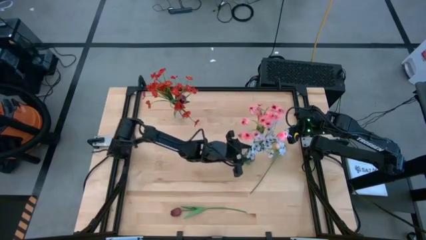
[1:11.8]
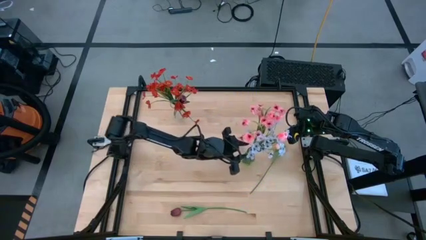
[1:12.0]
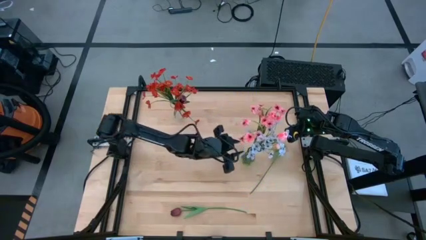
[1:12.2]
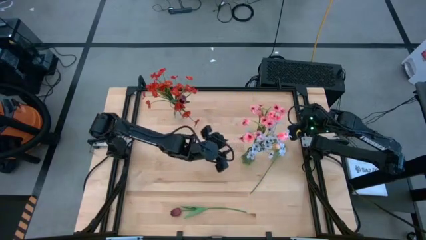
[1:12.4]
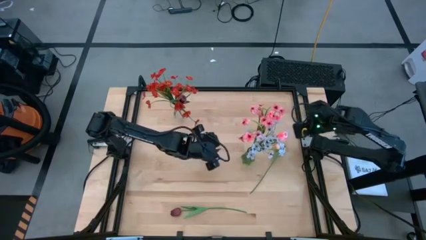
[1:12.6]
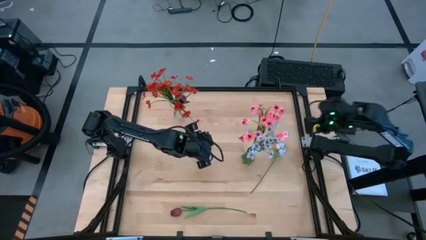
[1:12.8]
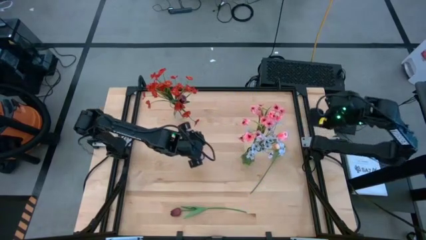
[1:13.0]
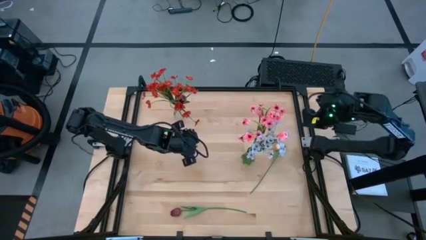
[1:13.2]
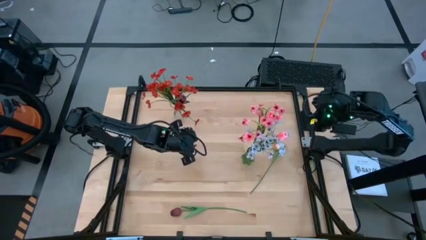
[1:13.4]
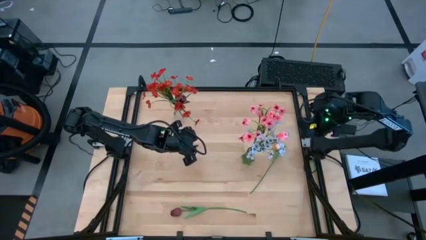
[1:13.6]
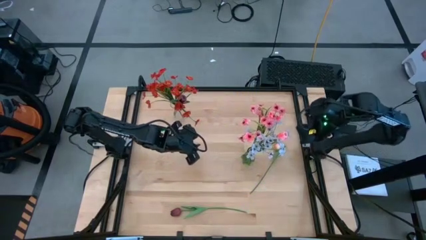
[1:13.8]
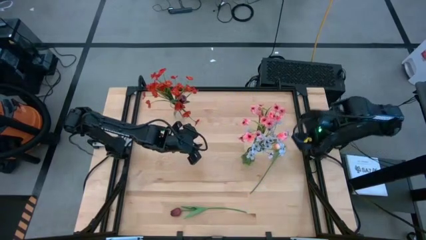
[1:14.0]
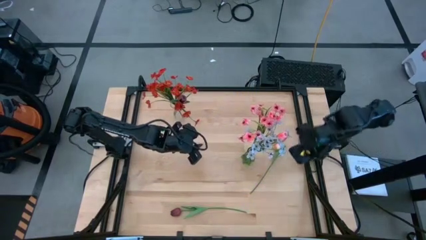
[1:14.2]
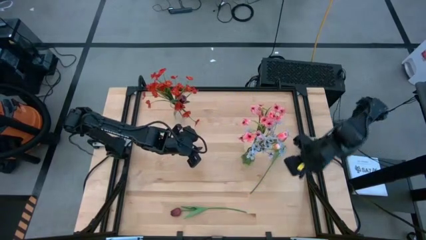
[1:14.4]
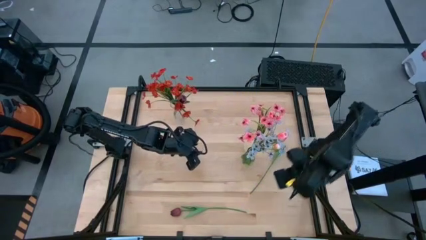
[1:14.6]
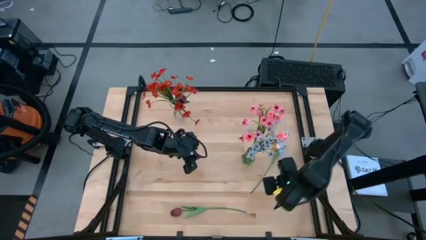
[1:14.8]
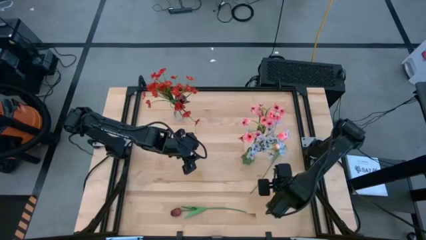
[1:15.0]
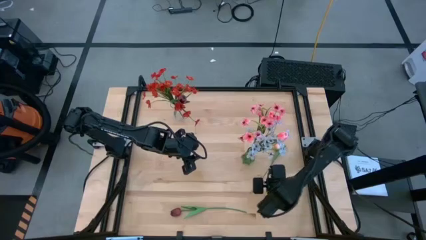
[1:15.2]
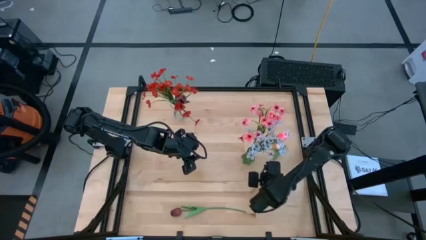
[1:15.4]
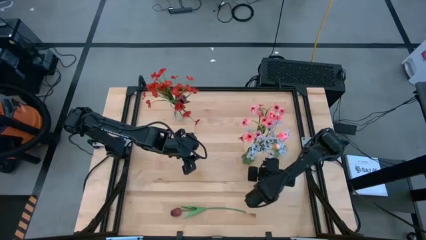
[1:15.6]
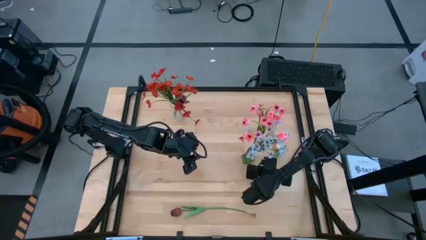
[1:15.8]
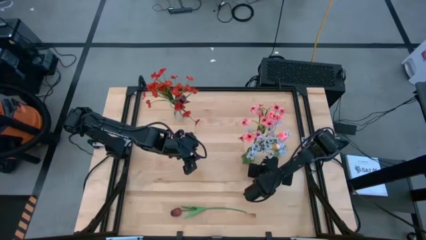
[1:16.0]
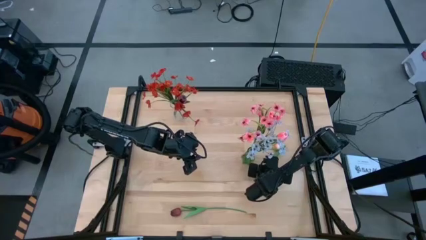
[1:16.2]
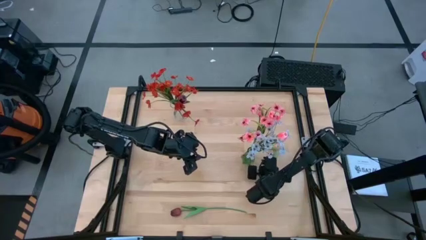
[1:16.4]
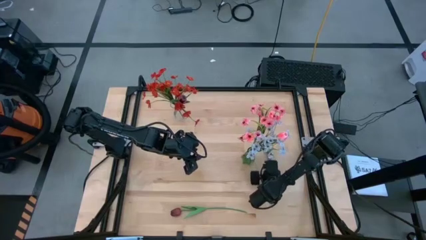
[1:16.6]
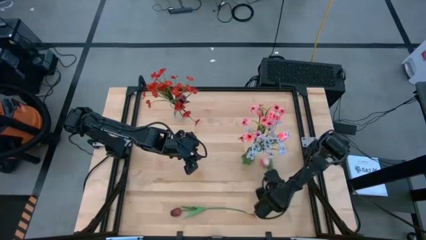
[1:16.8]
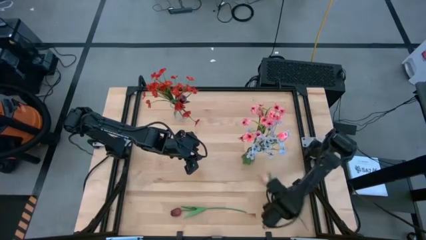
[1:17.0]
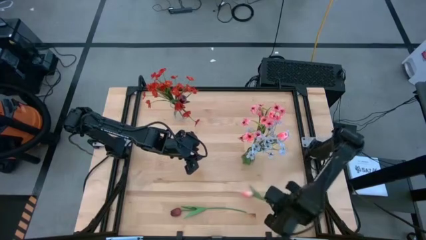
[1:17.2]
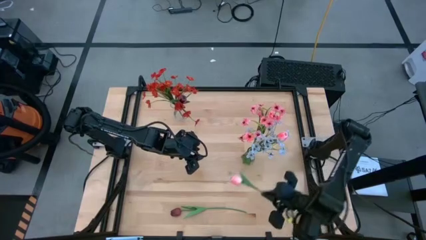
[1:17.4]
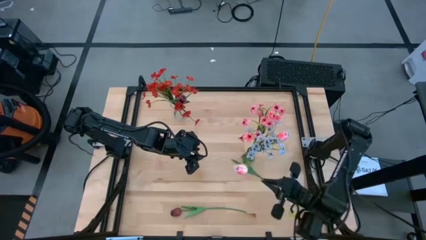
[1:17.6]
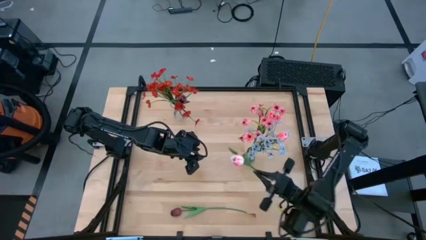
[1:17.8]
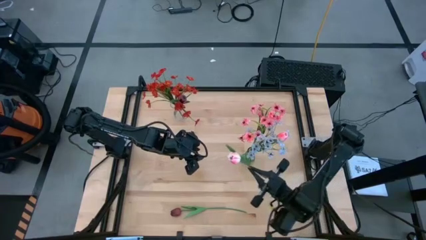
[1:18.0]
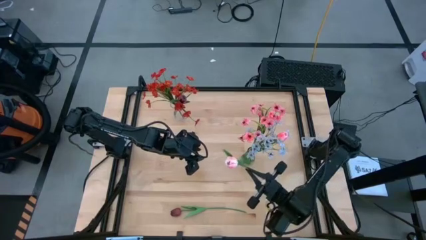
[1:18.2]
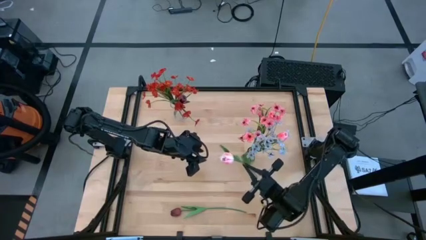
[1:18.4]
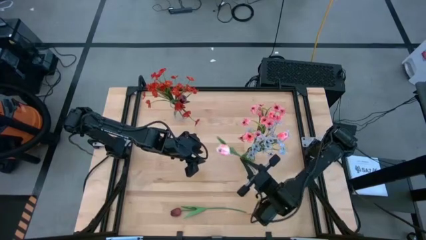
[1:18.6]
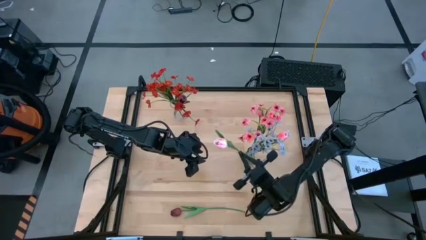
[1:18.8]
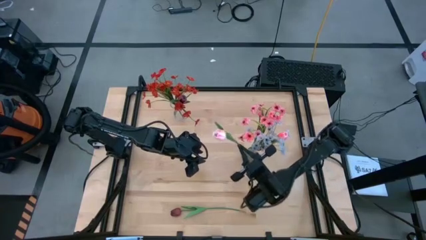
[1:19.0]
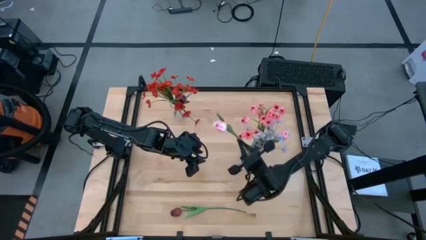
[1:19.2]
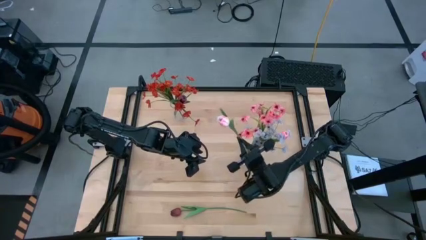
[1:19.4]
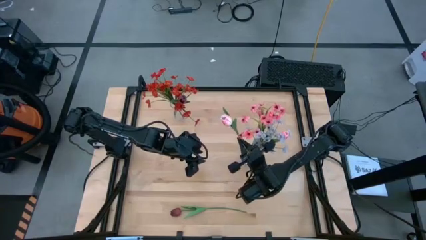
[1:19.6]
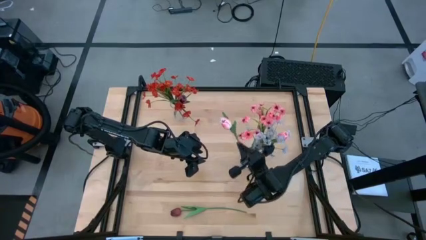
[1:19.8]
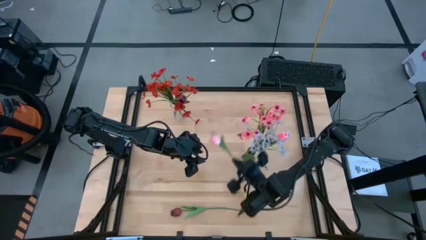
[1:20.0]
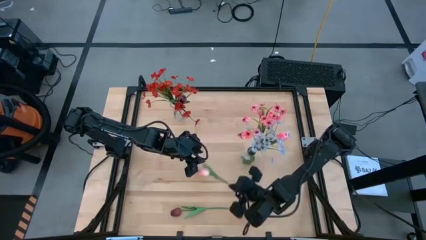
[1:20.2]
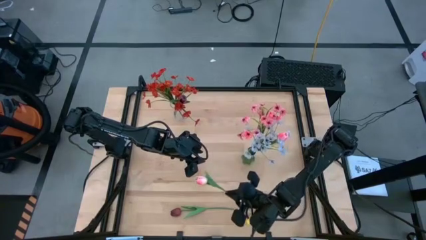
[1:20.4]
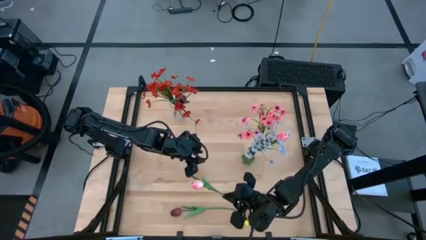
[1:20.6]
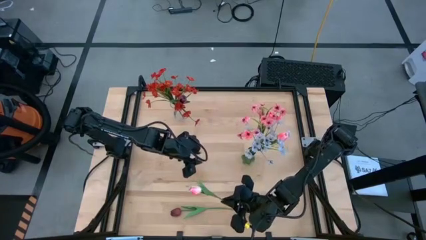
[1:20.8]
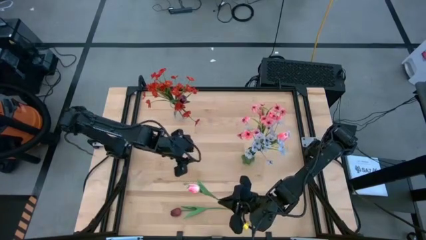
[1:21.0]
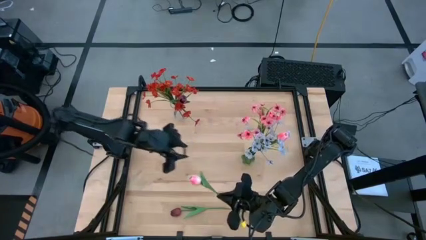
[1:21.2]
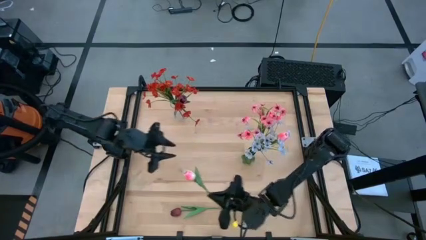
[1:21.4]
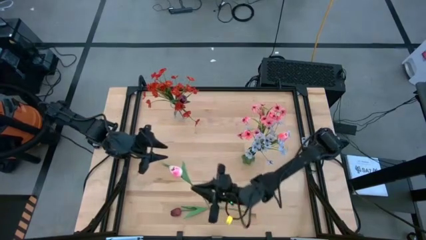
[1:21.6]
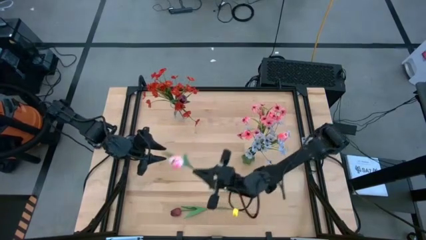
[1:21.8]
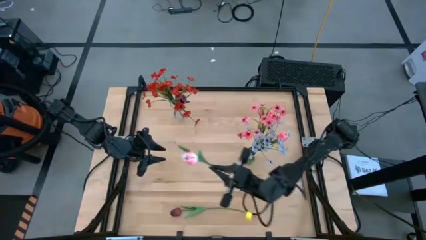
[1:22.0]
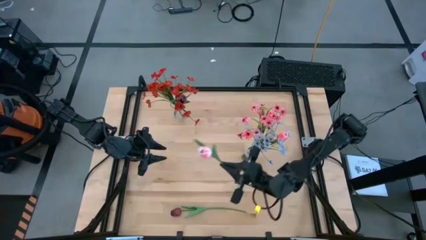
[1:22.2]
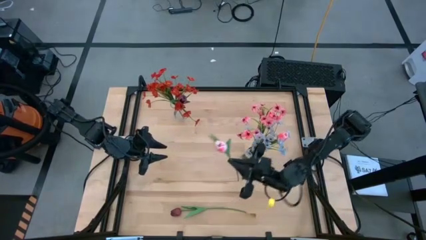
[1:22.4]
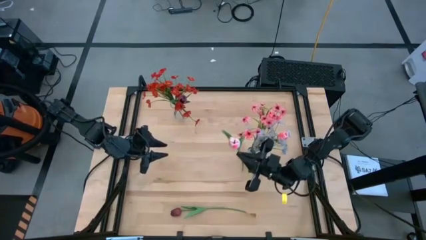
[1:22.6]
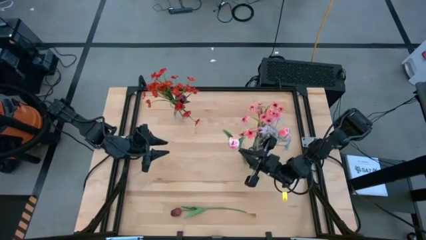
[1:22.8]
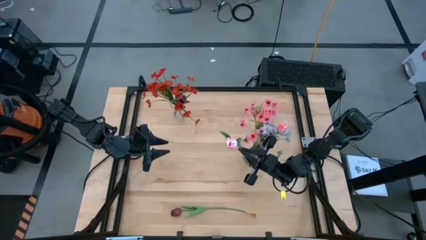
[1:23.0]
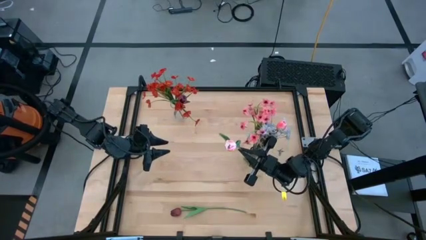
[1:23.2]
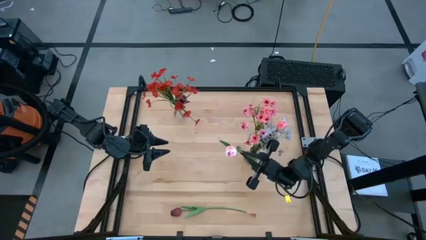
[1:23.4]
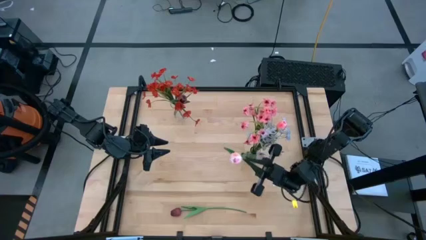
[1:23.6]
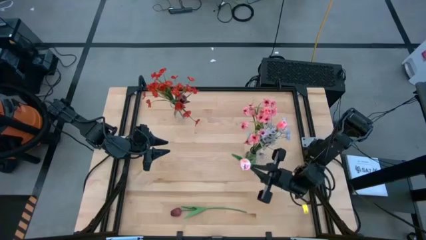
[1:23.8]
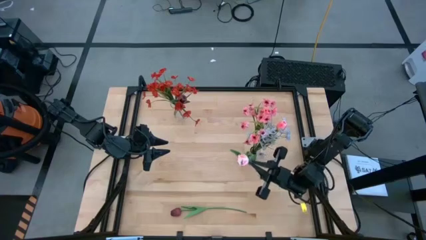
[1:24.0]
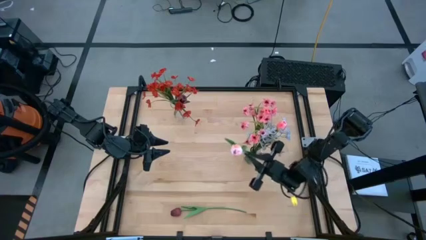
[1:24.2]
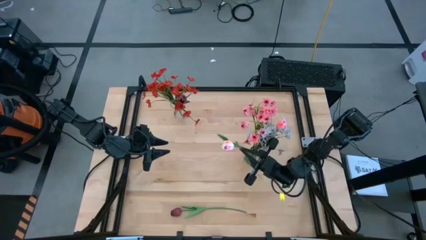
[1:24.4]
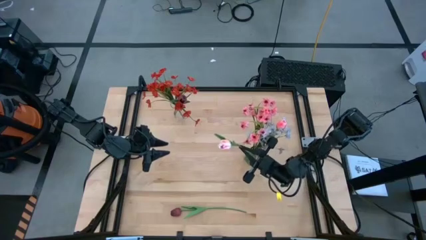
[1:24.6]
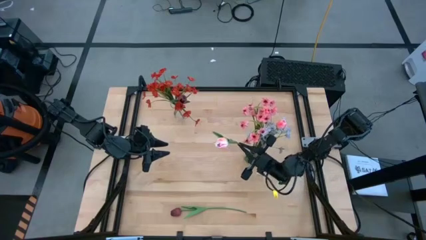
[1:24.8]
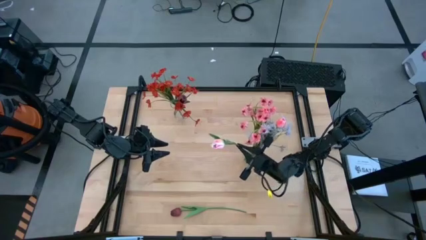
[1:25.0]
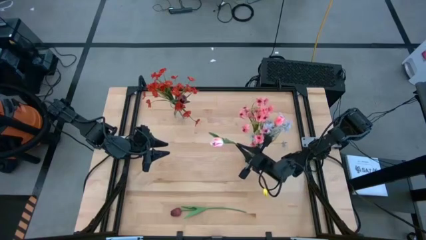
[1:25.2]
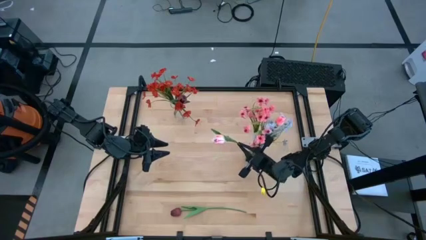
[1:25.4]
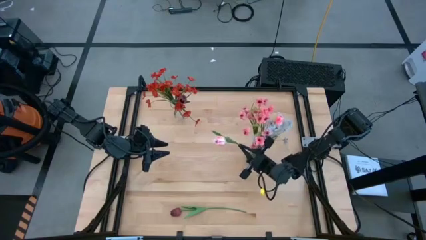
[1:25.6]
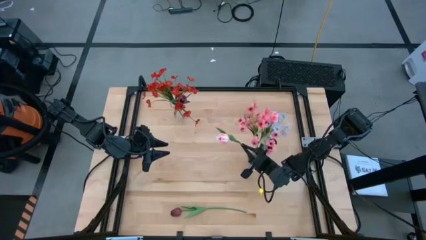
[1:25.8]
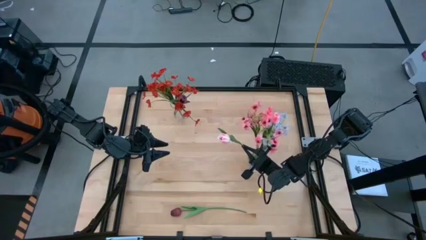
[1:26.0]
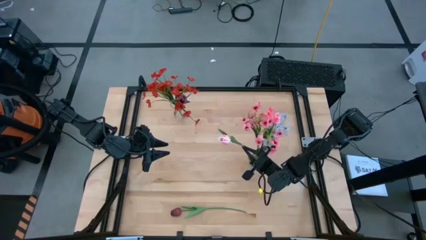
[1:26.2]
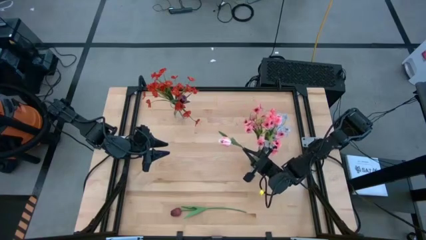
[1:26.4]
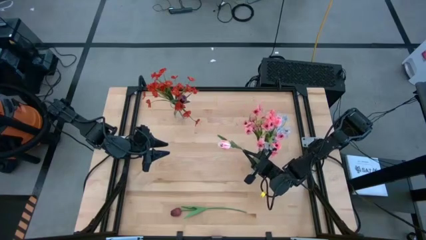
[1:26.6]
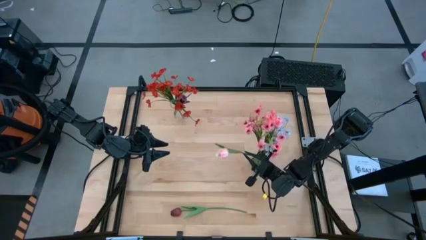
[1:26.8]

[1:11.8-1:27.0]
Task: Sort flowers into vase by color
Put the pink flower into the green vase

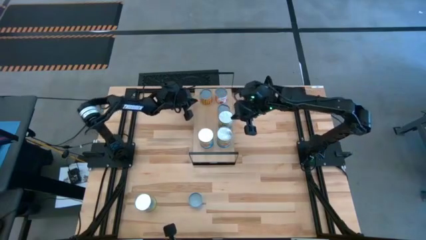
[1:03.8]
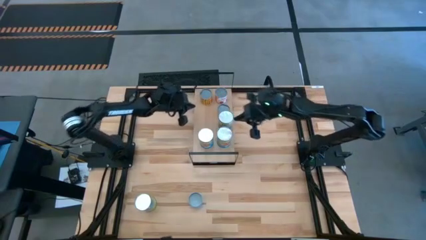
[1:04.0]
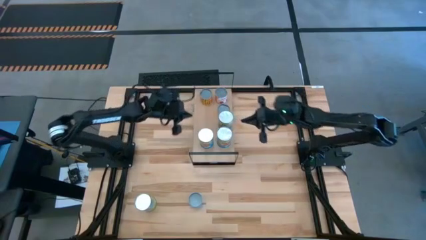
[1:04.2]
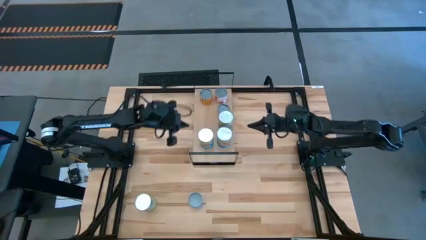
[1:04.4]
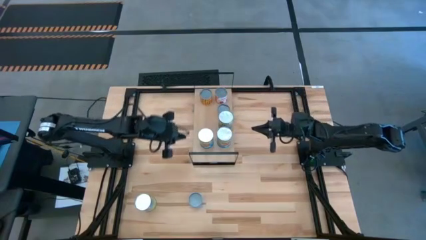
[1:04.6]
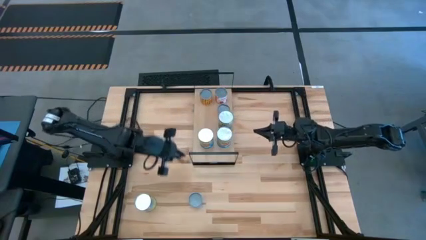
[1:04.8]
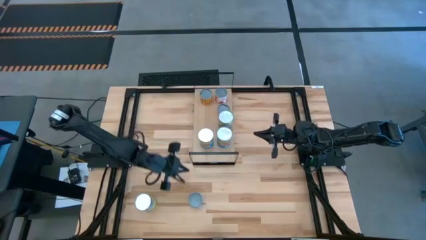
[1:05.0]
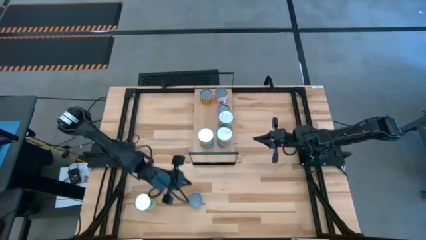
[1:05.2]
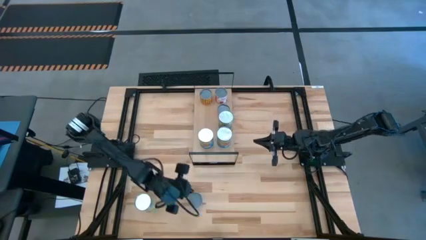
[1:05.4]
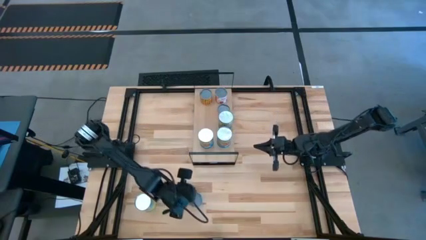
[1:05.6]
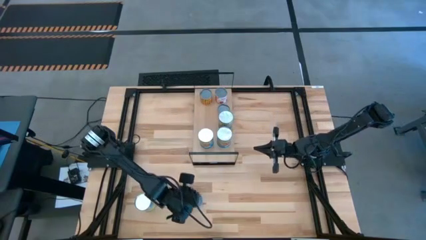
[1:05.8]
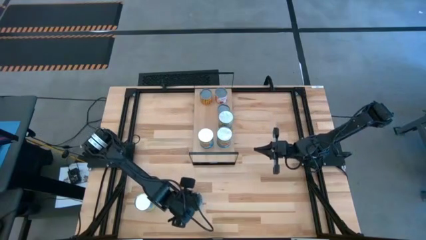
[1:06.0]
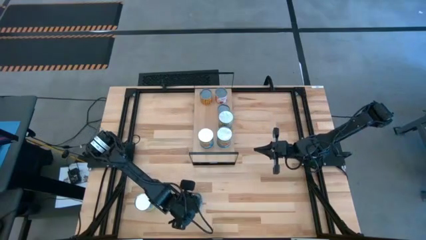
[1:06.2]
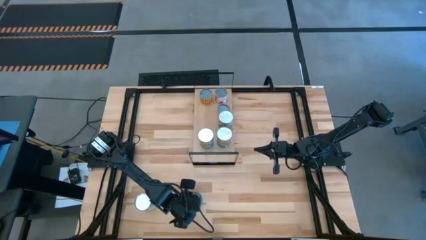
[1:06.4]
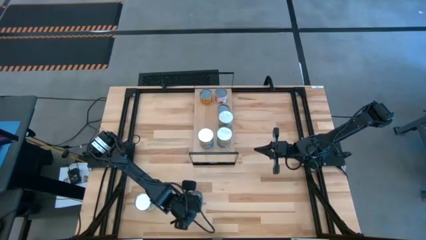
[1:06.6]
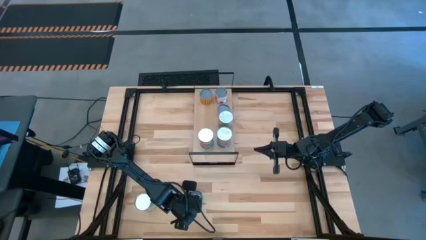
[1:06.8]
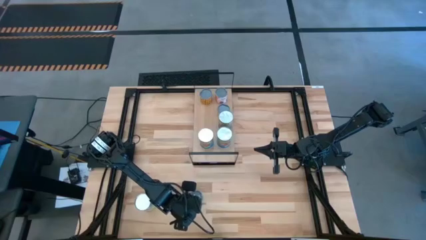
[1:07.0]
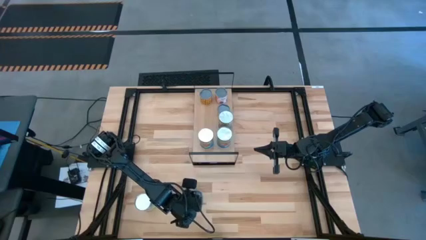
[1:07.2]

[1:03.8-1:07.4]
Task: Pick and place cans onto a shelf
Put the cans on the shelf and align them with the other cans
